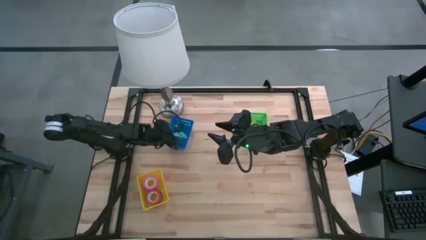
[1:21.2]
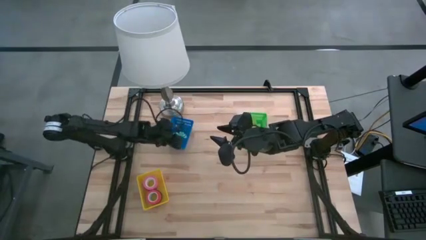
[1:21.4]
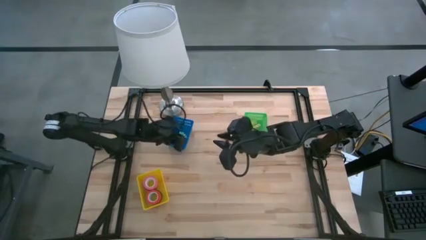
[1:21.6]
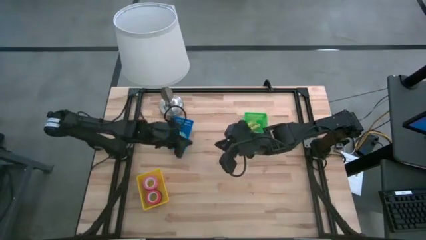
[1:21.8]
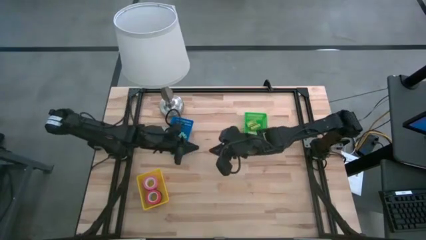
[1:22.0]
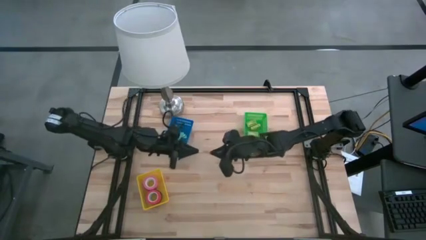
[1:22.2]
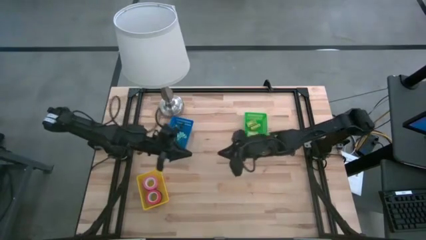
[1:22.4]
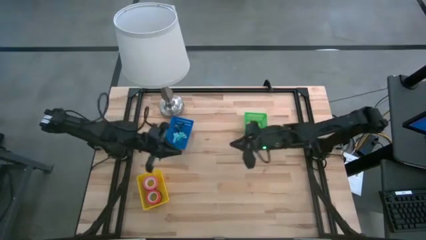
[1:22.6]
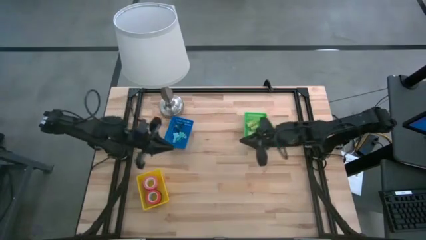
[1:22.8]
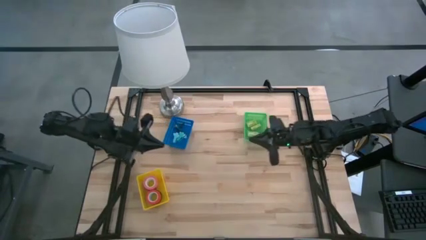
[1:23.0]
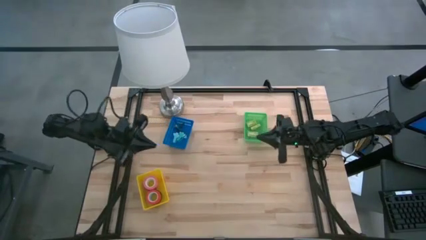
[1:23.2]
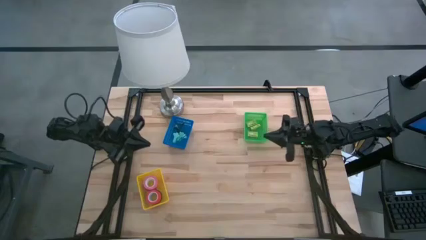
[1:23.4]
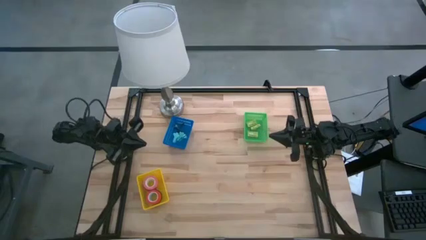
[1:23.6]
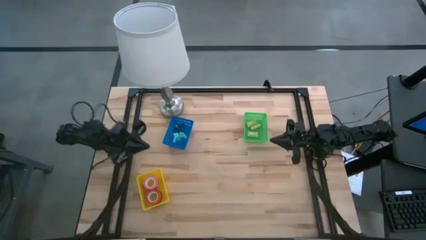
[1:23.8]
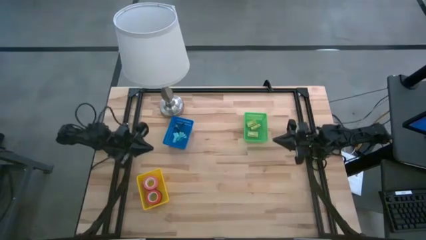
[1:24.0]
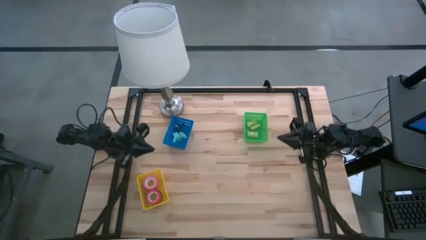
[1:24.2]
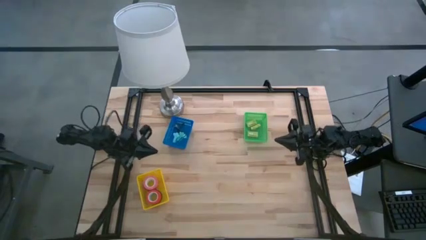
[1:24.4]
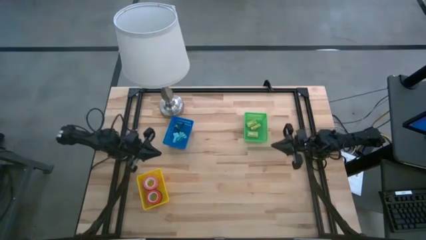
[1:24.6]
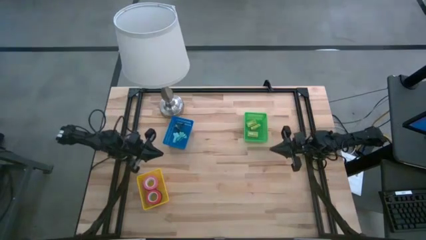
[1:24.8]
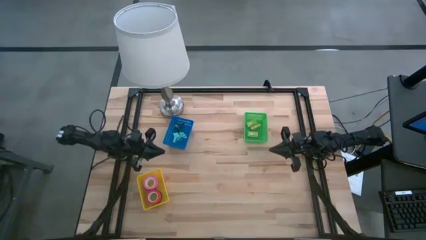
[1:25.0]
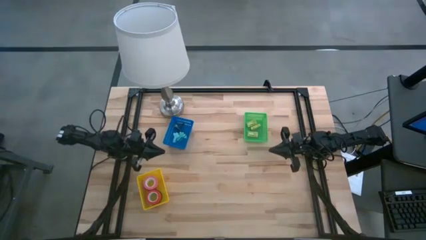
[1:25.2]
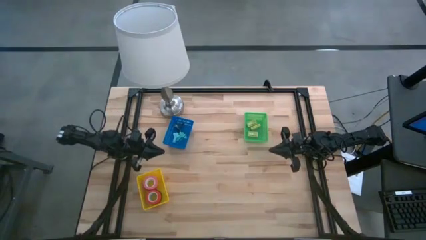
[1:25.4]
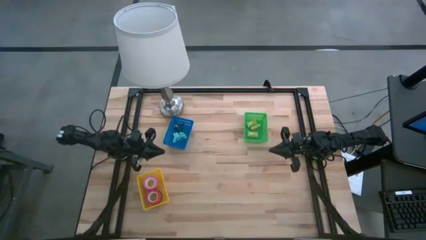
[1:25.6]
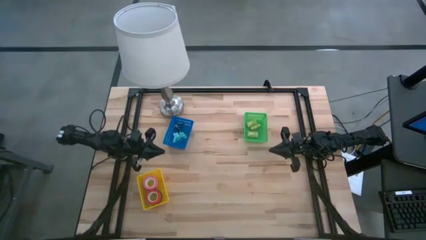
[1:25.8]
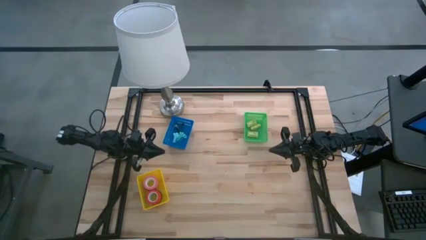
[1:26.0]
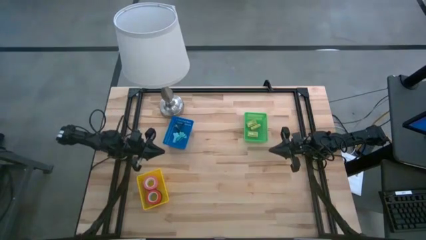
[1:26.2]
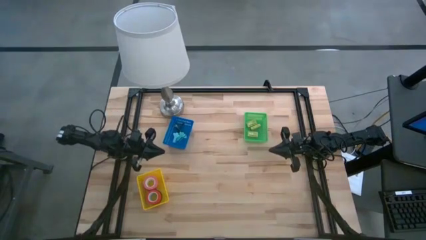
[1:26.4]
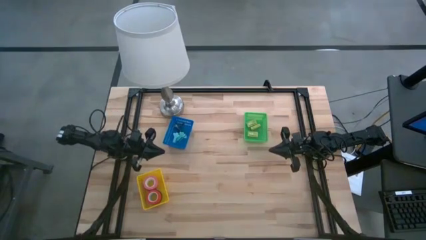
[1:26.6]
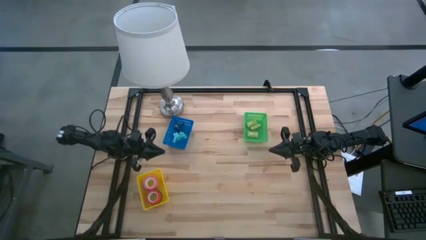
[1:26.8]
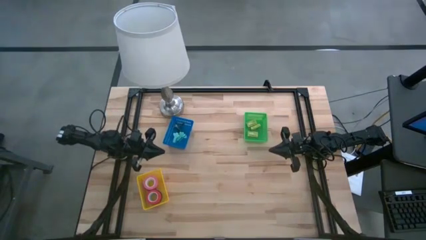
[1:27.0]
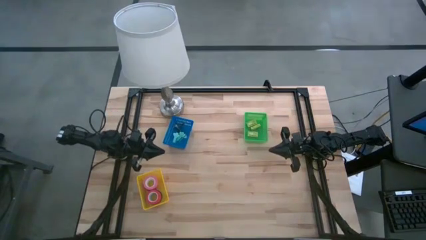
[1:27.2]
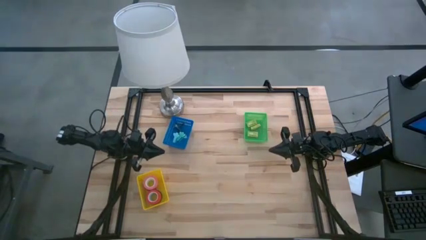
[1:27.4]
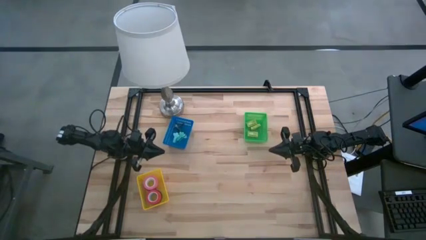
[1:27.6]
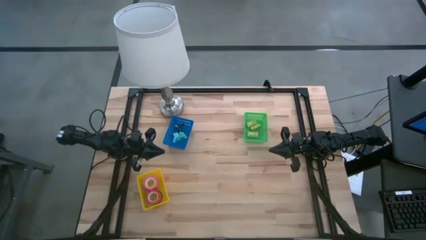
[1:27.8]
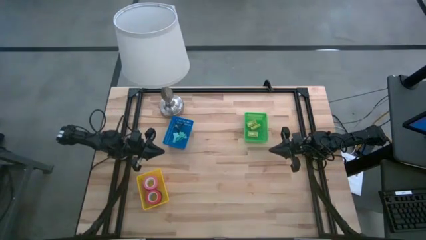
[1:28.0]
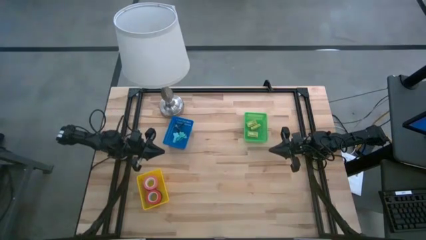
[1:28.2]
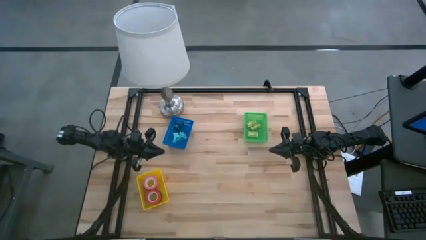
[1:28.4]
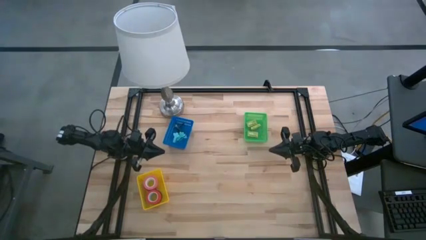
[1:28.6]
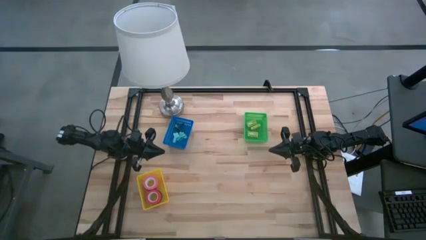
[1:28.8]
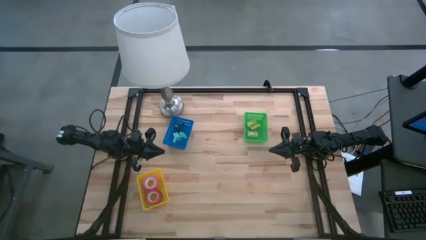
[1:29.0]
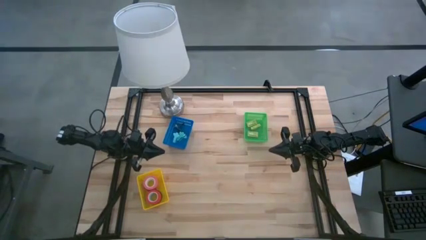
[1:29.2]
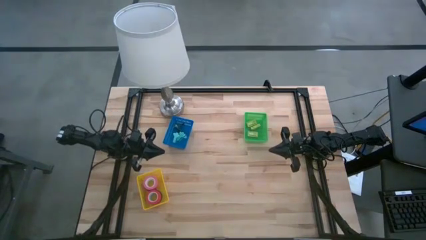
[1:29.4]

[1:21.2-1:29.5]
Task: Pick and place Stapler, Stapler remover, tape
Return to Home Position

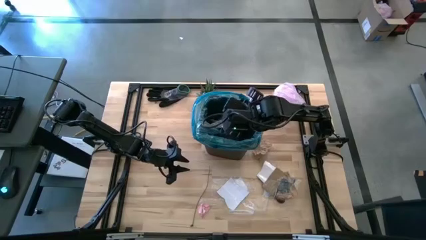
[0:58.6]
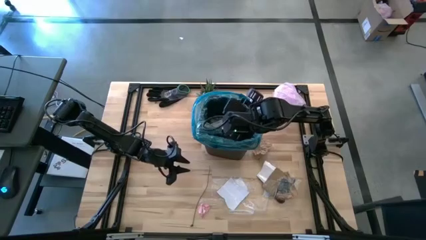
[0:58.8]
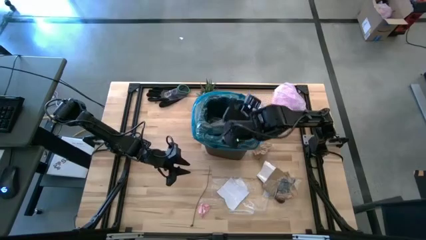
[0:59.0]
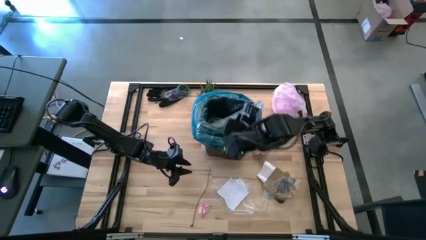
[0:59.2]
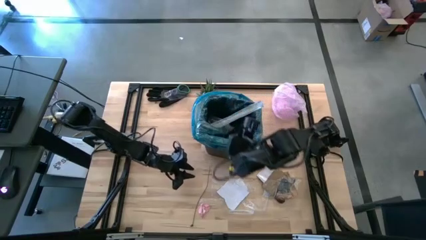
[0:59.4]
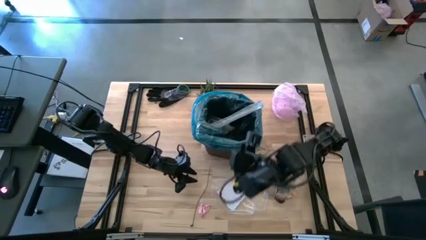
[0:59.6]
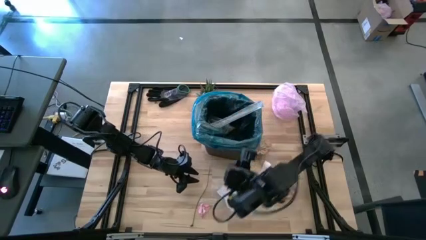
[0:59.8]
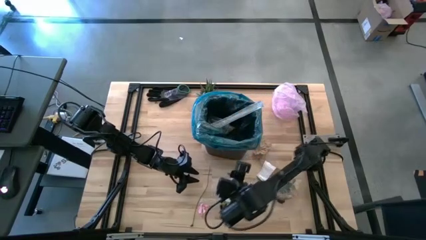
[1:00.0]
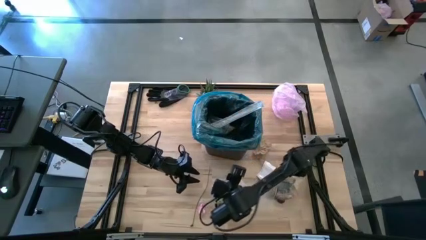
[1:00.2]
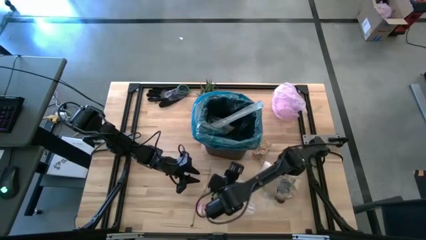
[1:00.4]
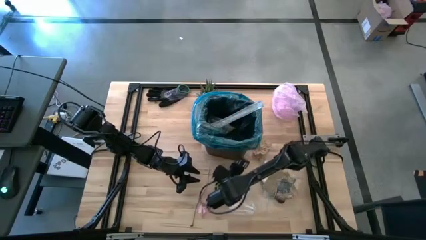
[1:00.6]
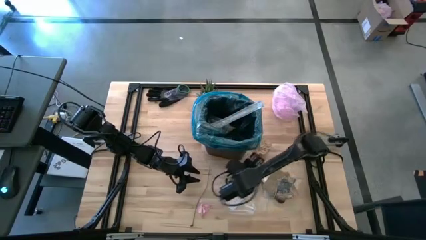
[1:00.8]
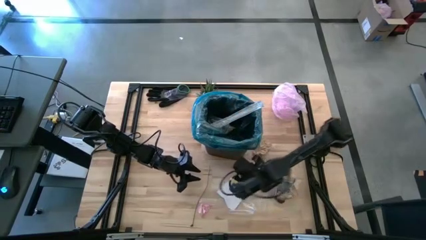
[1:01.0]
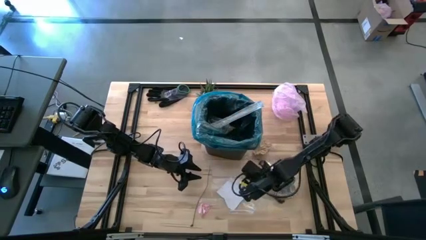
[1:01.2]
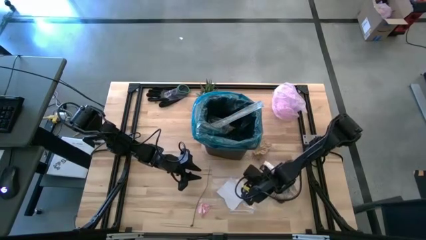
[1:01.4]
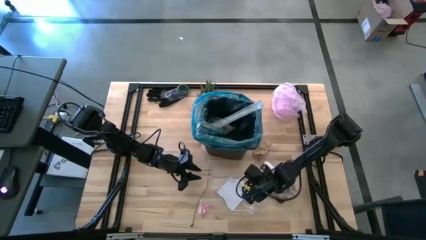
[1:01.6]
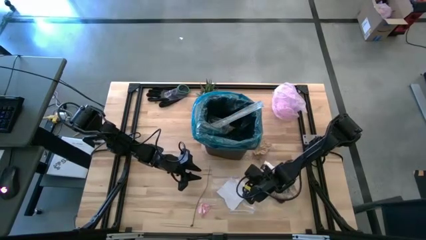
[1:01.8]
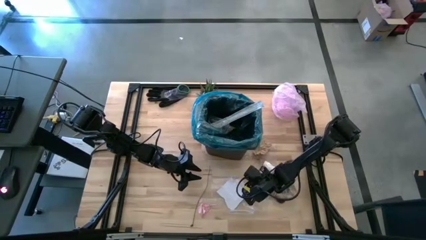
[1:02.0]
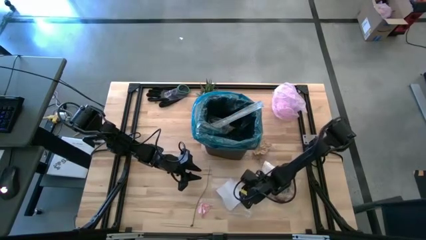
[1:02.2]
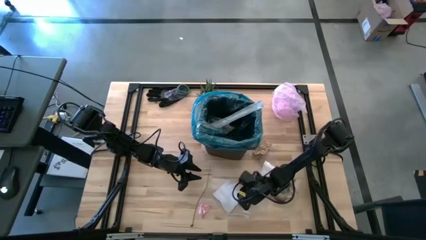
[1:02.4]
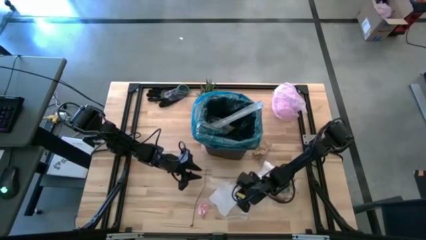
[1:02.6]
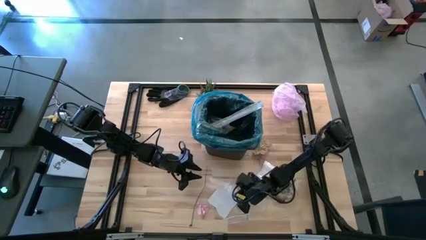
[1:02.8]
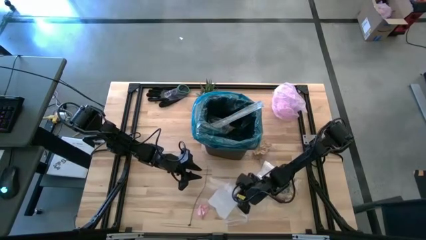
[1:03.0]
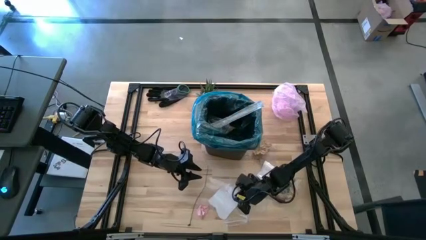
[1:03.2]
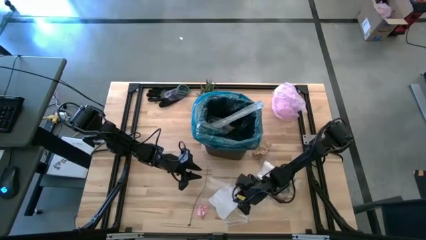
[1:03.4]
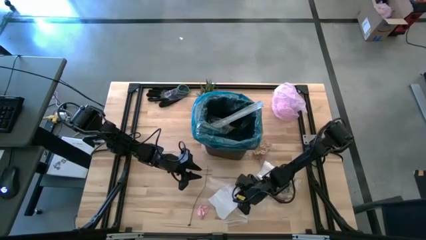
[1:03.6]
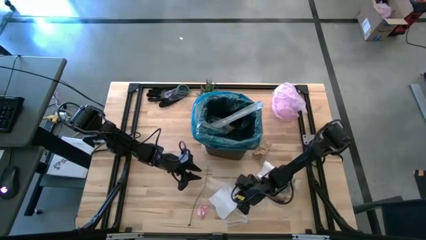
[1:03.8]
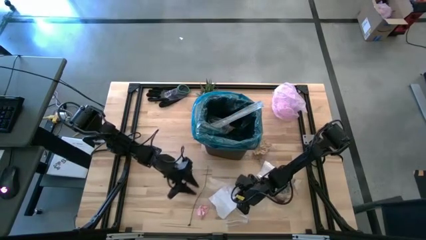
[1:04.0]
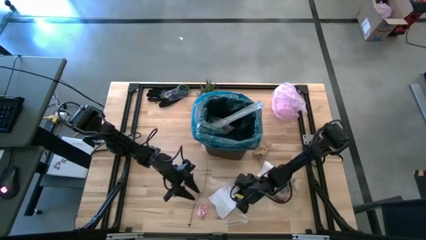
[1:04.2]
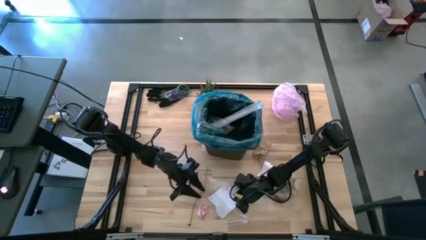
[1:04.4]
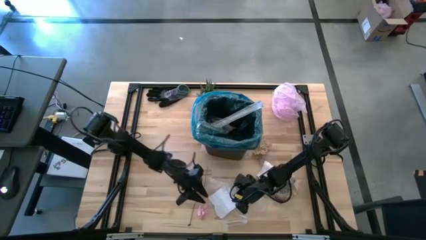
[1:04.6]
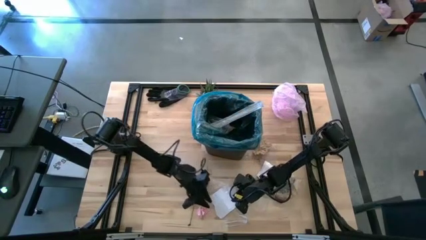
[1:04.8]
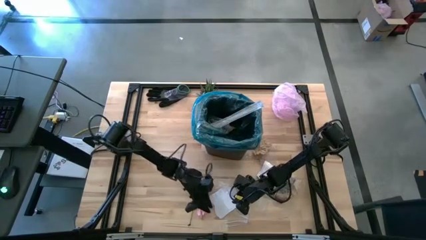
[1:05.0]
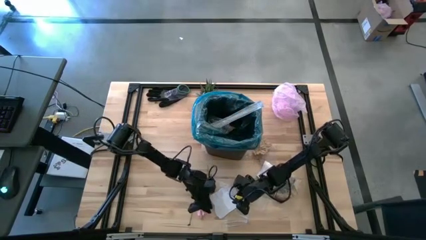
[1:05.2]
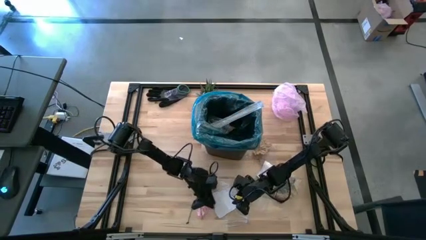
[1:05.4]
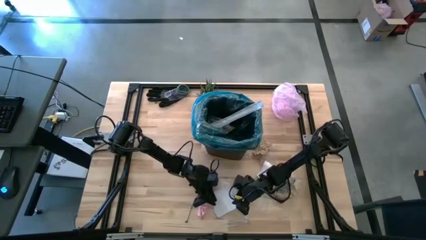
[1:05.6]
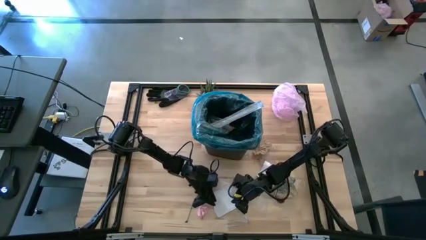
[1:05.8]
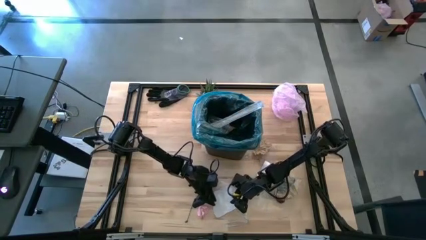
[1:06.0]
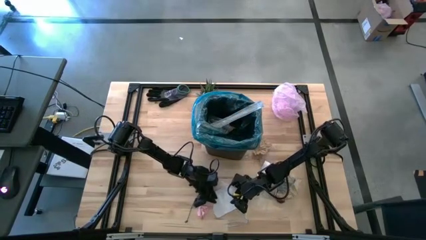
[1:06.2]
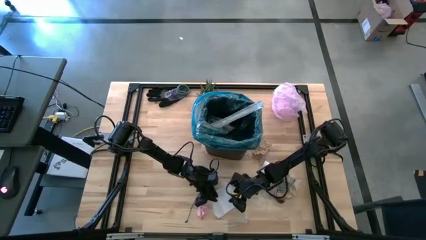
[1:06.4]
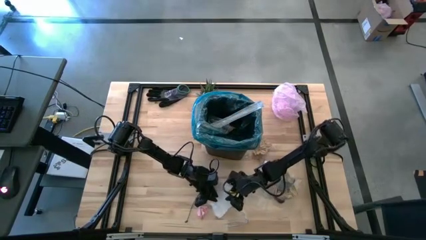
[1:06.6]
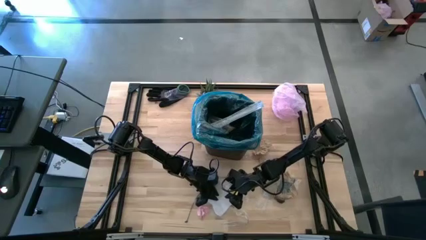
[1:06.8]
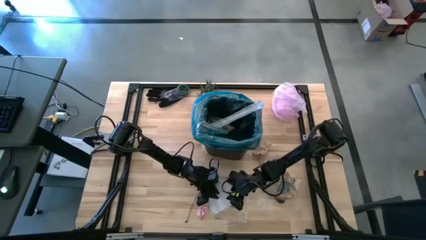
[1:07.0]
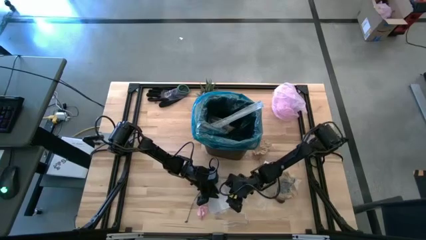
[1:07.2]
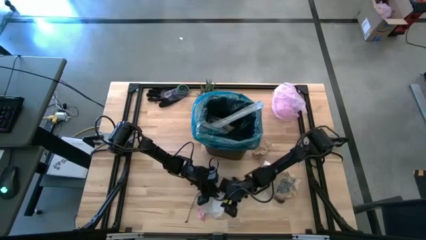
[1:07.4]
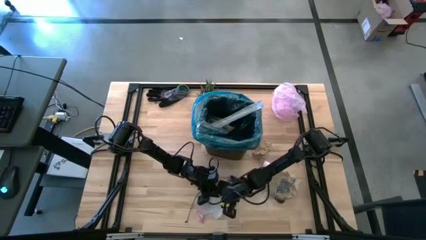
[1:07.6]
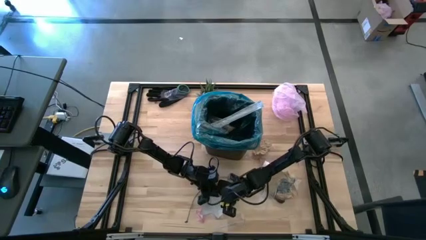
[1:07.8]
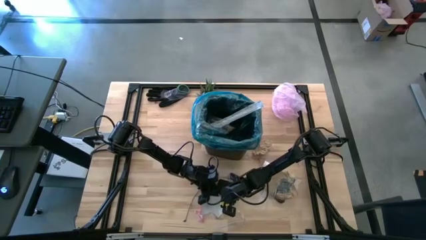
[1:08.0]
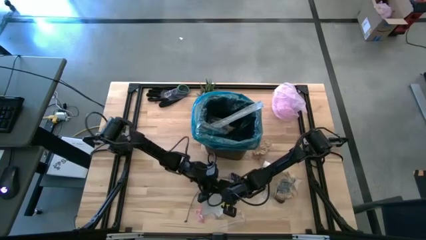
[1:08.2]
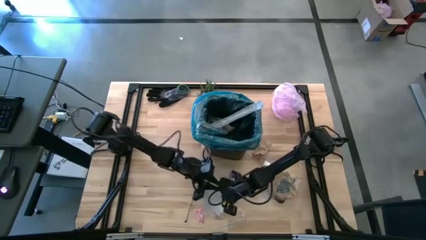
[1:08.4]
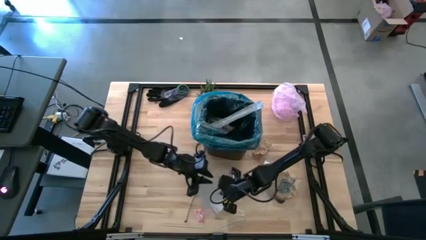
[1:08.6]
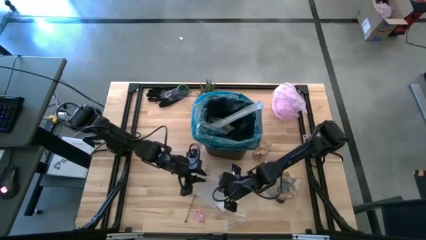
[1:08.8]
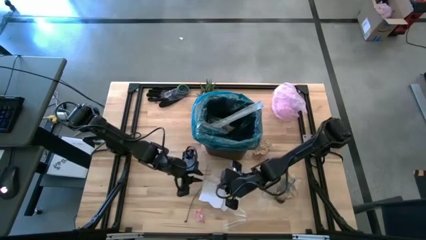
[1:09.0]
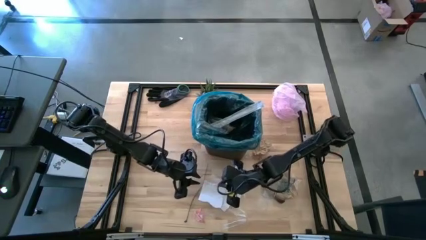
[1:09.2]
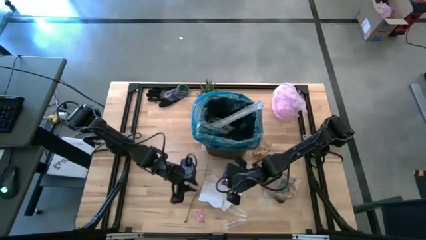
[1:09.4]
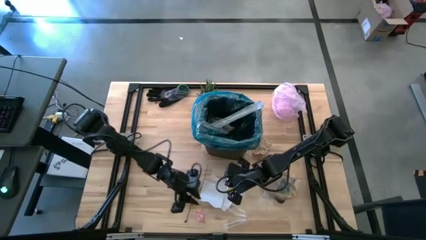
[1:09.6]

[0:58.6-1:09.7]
Task: place trash/remove bag and relplace
Put the white paper into the trash bin
